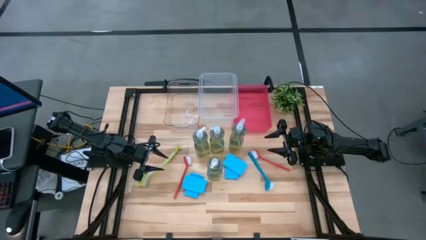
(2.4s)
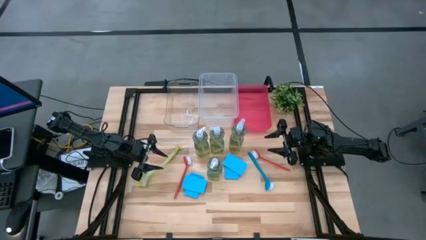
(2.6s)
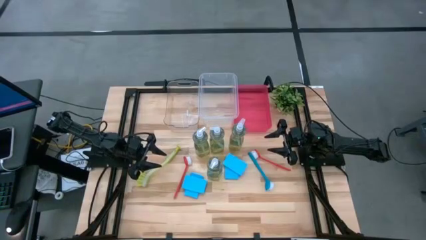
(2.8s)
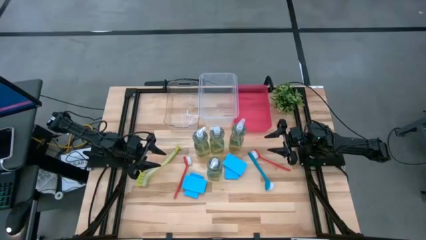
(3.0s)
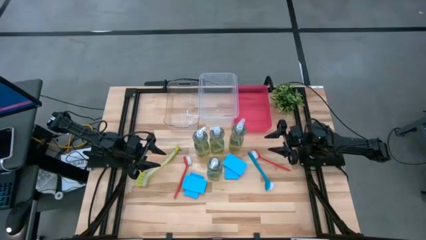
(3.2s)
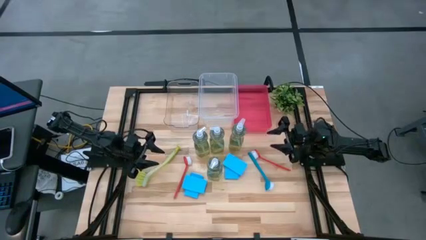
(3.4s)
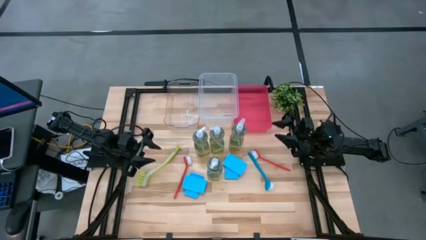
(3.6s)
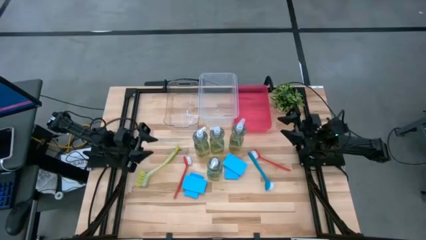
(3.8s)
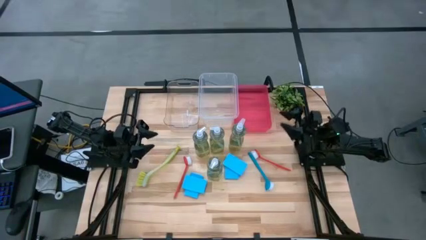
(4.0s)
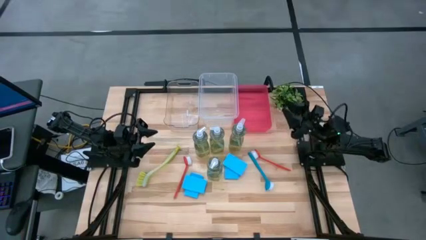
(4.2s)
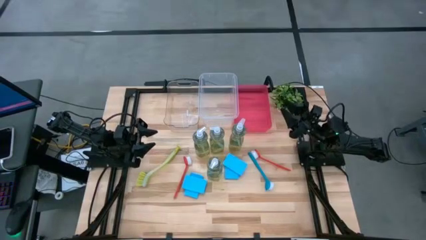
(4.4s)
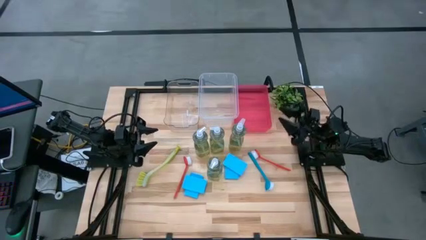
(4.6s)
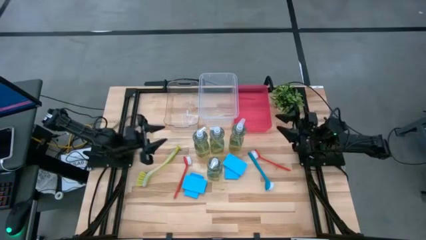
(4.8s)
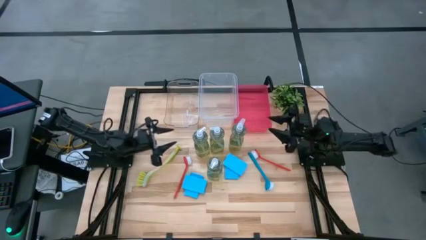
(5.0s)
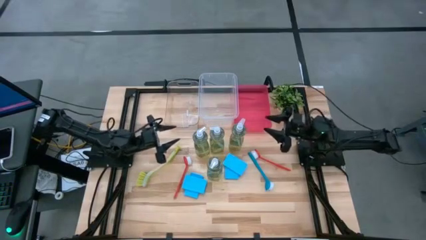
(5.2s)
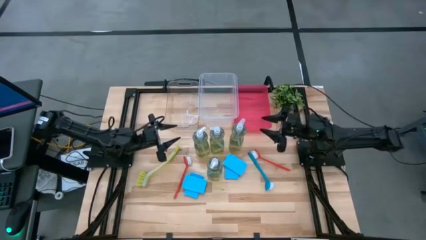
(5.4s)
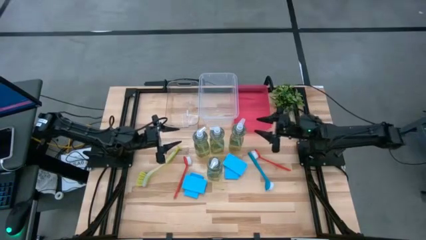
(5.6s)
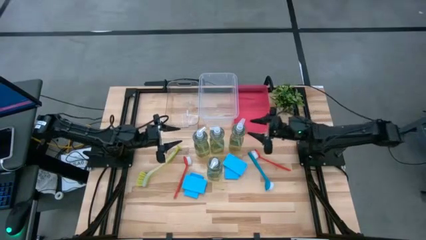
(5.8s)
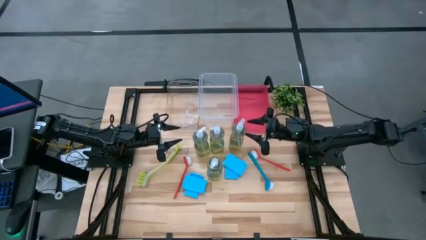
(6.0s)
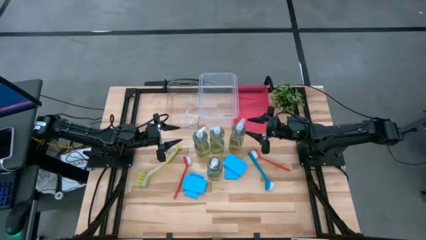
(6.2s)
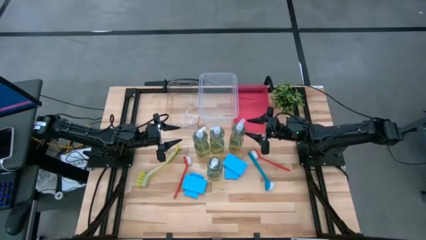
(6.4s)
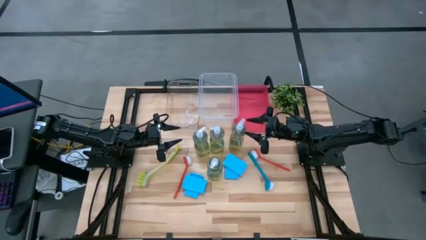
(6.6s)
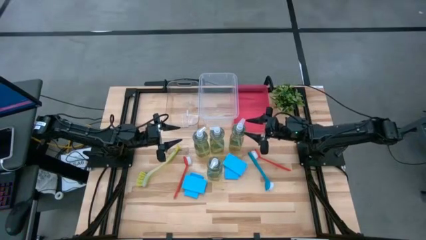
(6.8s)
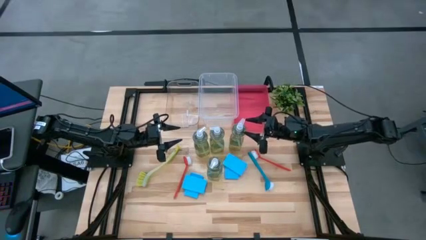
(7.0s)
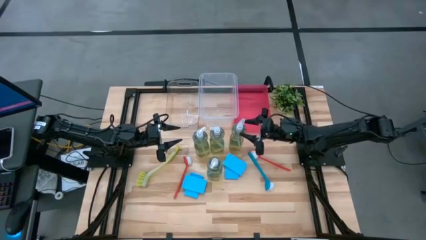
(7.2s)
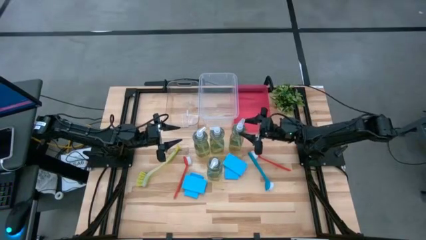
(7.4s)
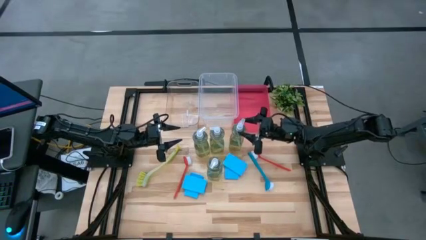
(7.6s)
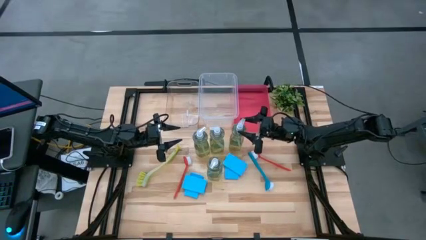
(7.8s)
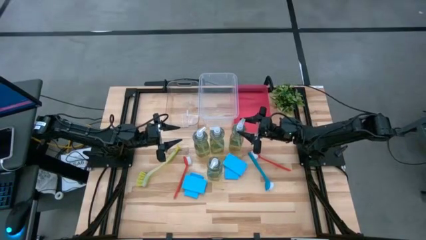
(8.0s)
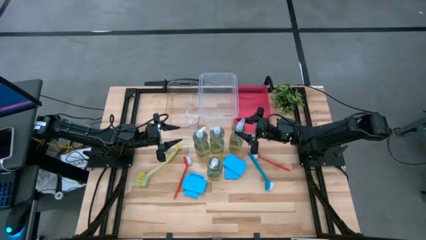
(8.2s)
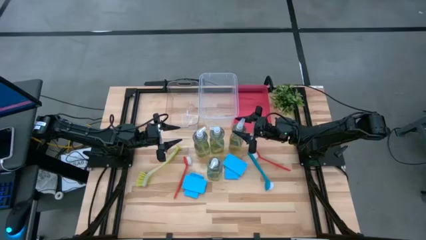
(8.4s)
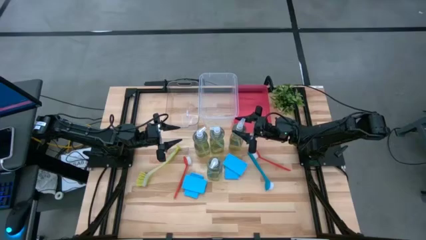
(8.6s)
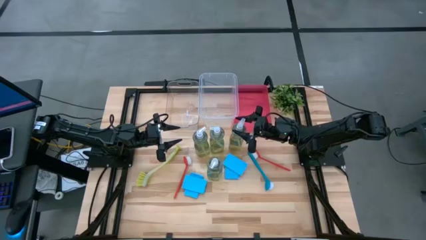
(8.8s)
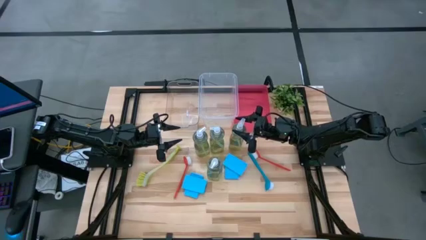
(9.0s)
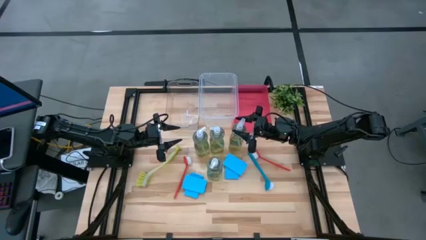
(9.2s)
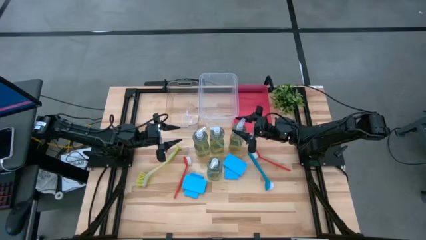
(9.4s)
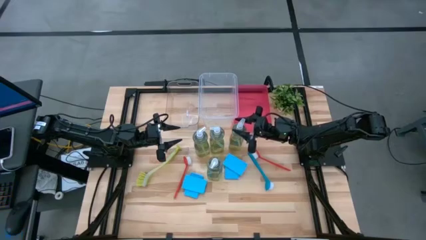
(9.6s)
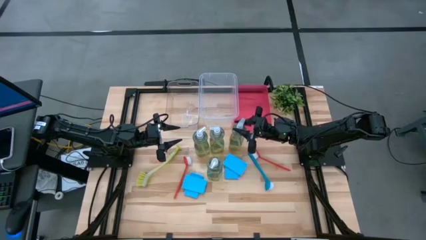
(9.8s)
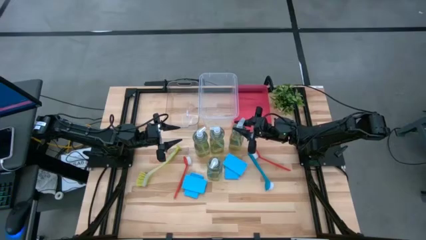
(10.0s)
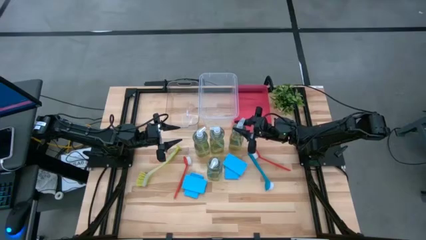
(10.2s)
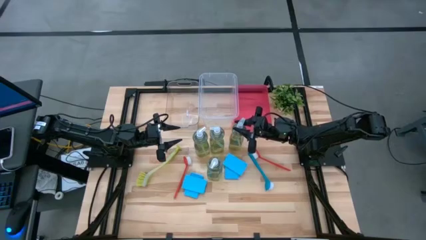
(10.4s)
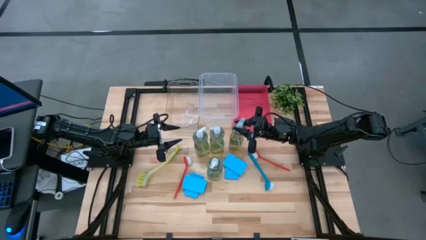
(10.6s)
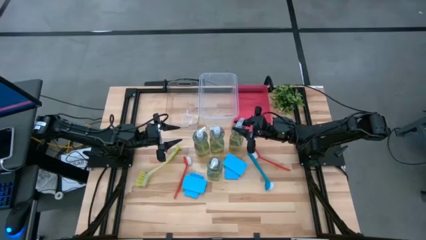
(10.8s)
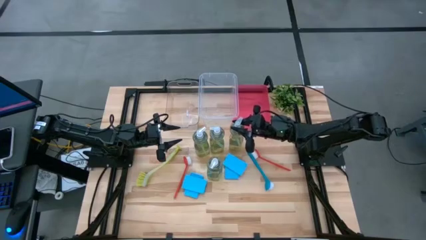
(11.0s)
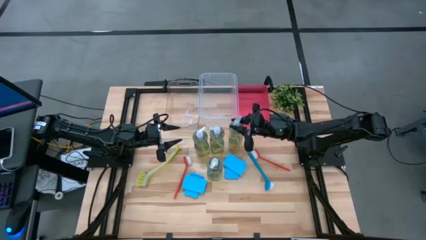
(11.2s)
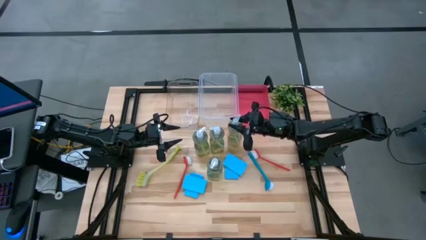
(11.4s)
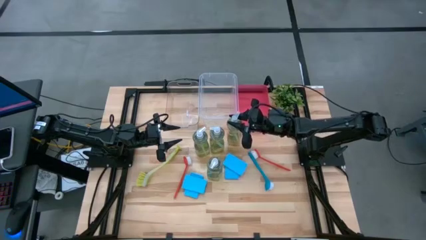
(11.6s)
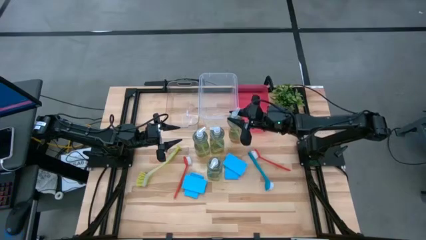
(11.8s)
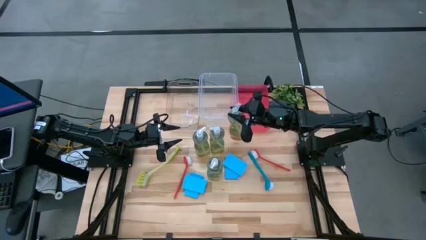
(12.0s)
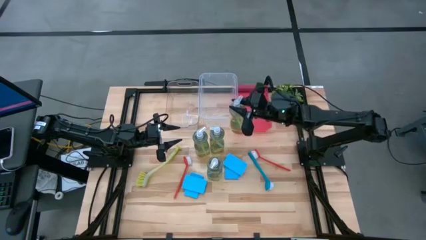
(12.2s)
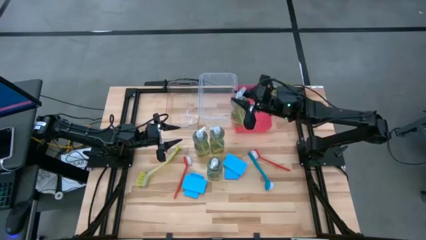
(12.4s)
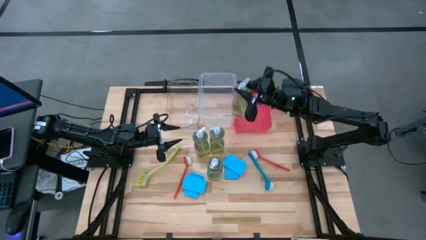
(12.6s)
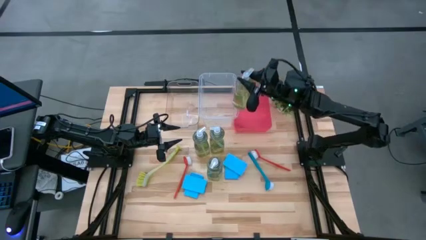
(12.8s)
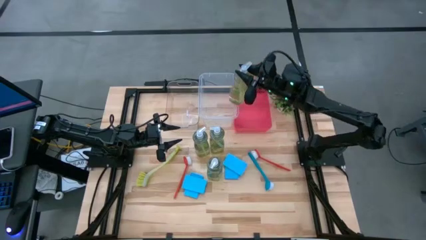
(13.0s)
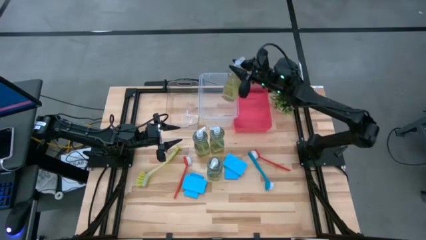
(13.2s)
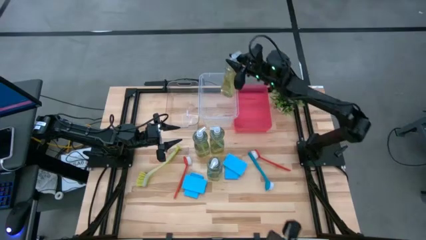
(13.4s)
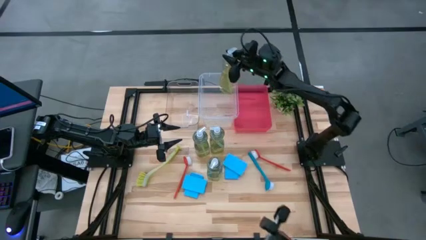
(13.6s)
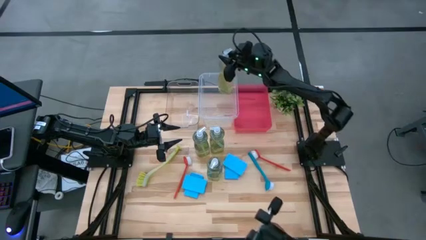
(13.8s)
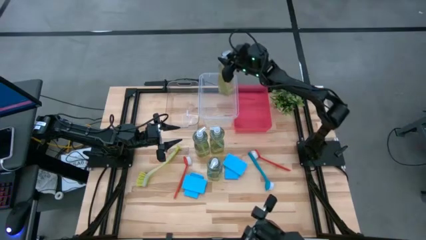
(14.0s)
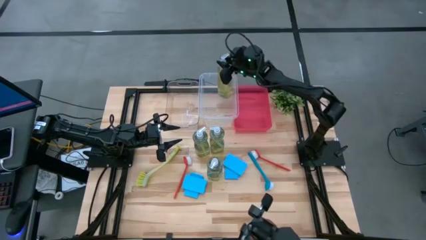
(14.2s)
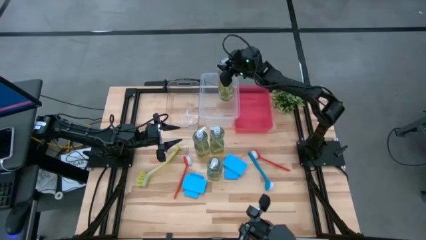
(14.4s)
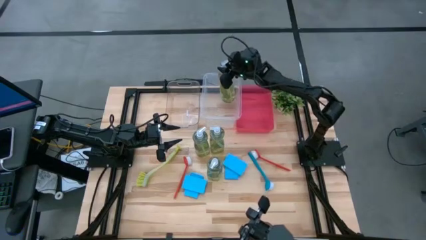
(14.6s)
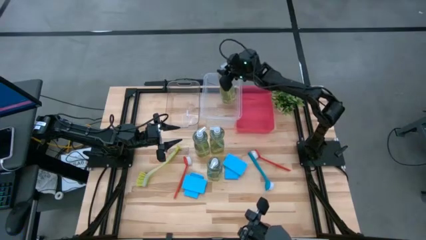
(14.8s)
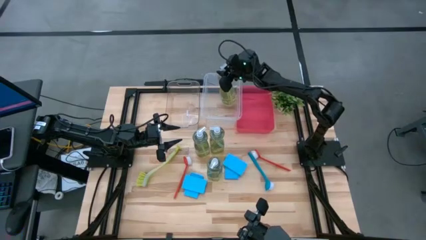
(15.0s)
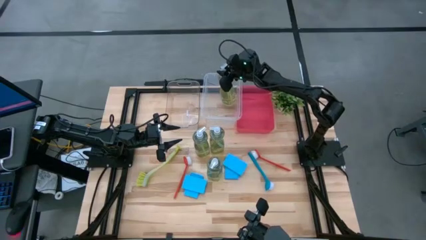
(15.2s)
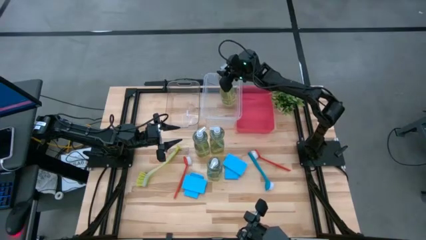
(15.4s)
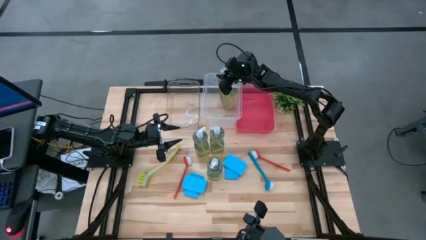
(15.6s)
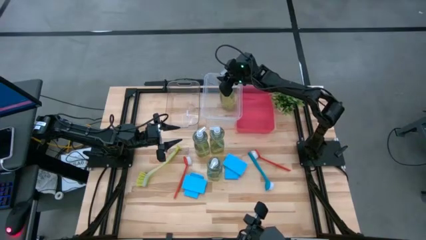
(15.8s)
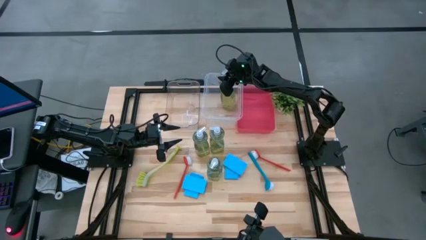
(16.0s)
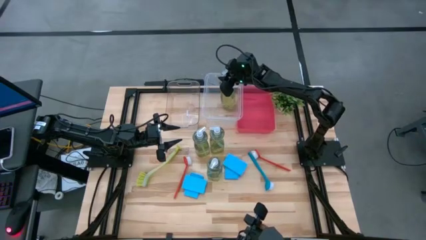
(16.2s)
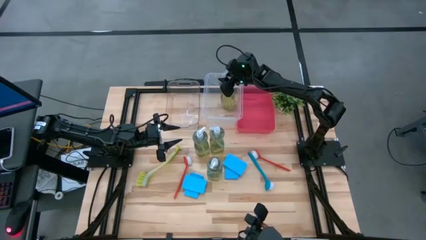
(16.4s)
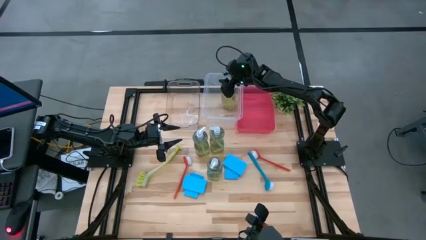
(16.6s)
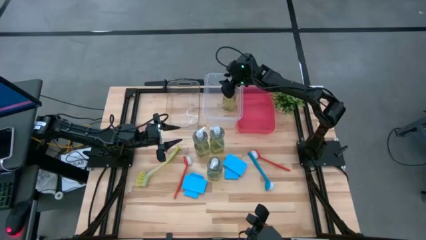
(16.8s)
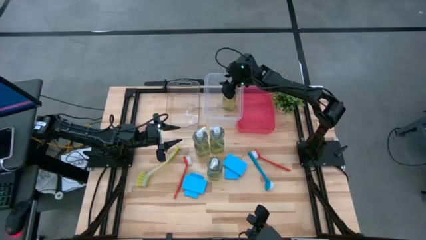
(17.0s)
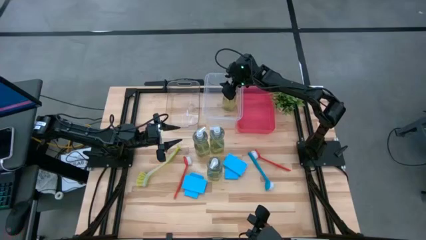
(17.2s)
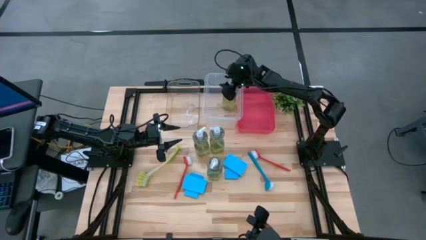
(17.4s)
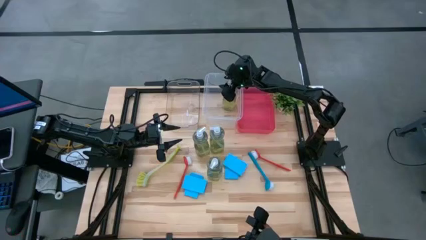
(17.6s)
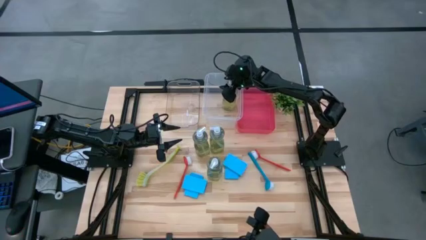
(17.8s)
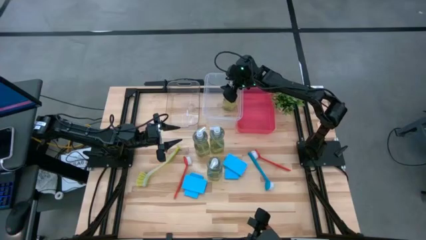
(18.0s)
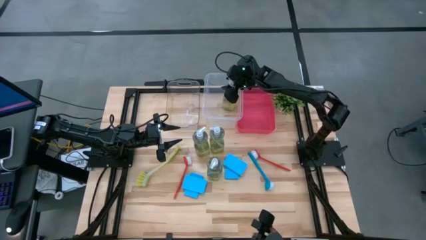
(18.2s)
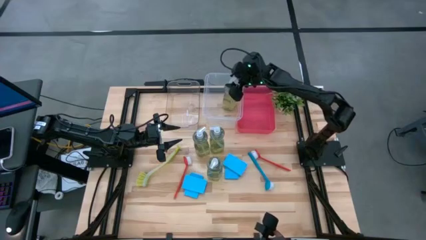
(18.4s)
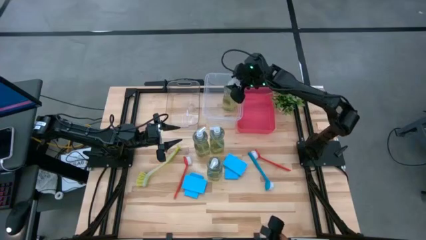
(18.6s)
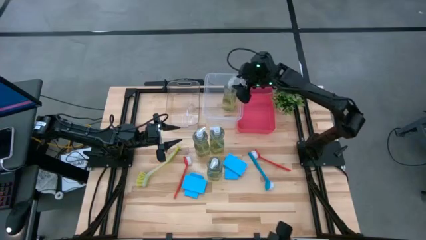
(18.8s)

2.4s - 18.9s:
Task: Pick & Place Kitchen Sink Supplies
Put the green dish soap into the white bin
